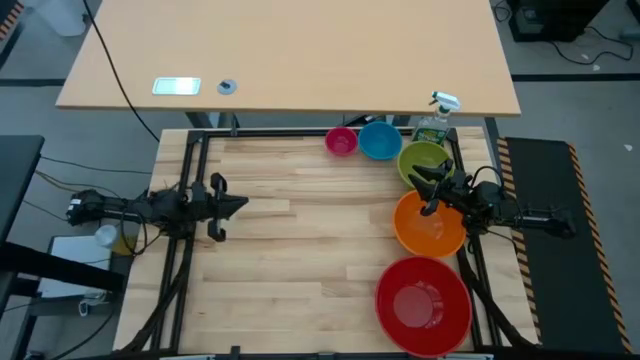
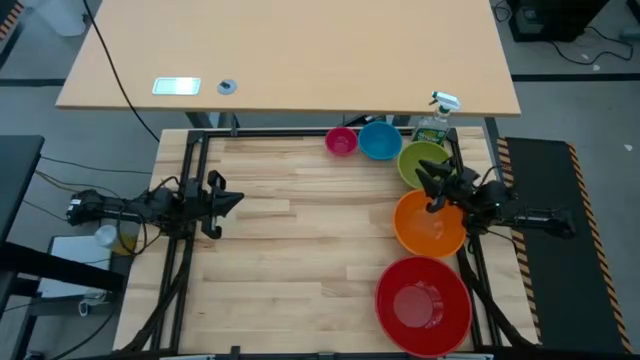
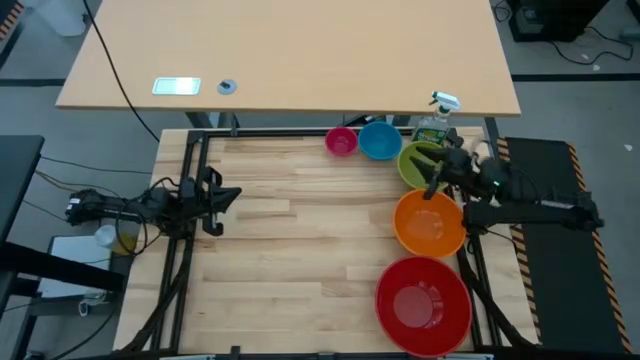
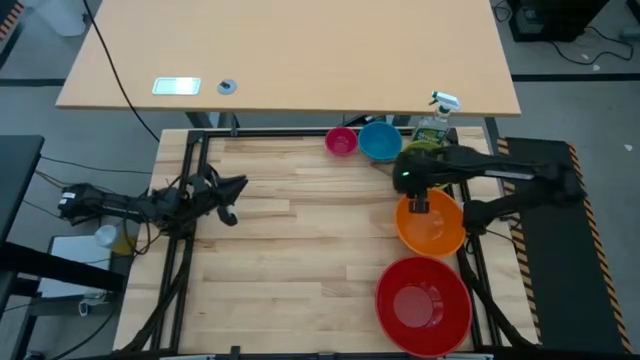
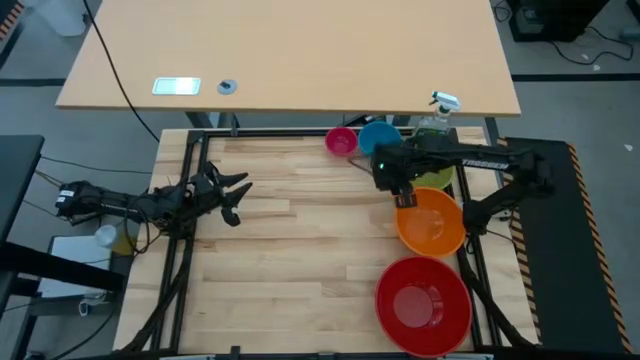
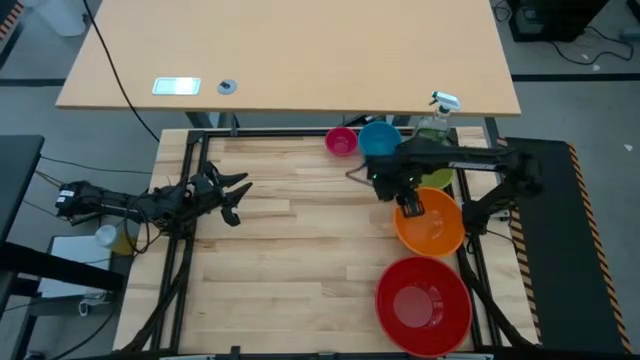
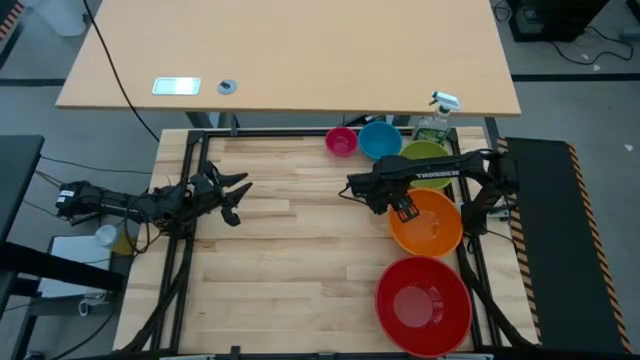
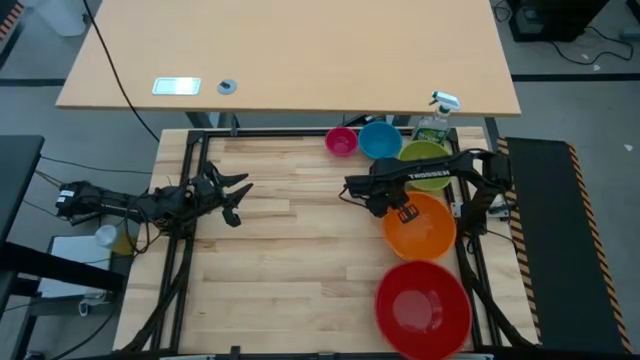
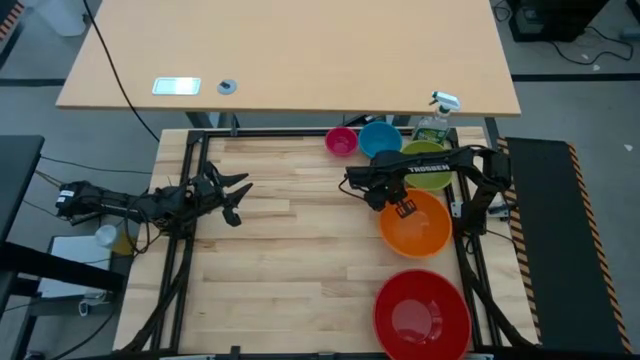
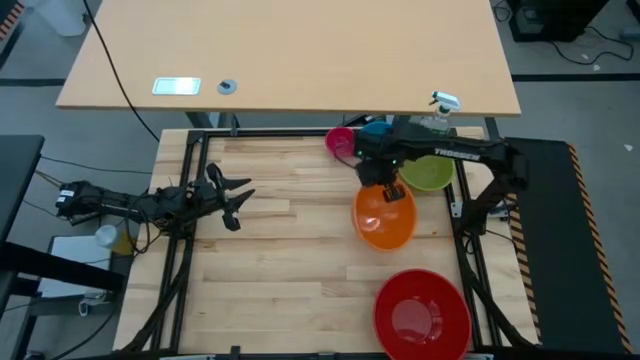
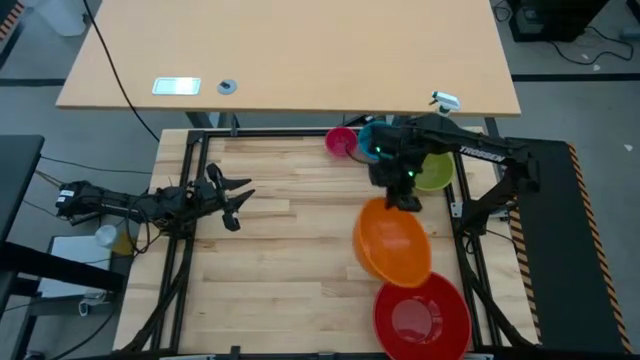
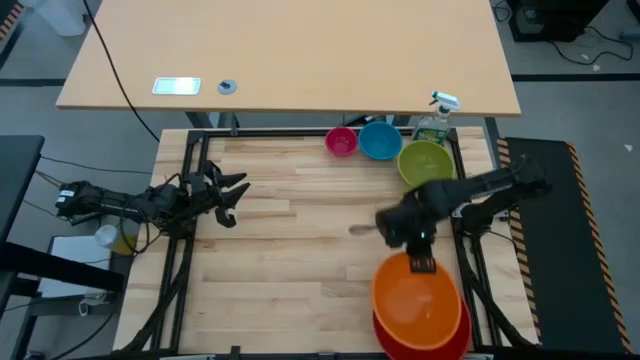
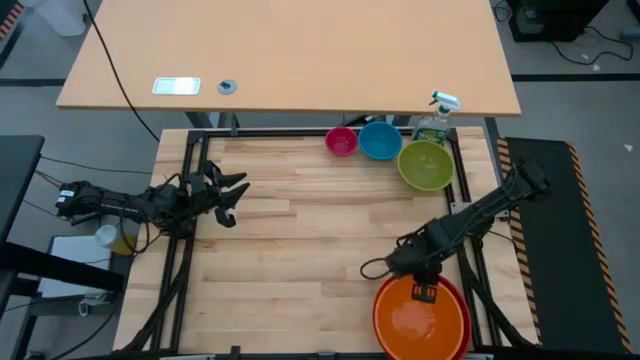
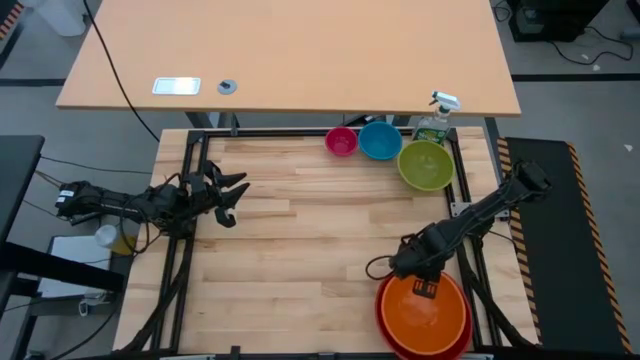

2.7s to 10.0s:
Stack the orange bowl on top of the red bowl

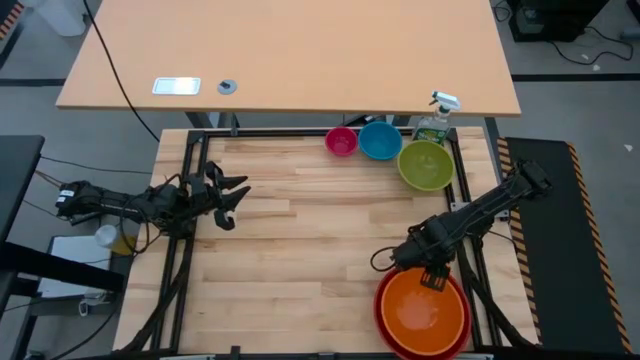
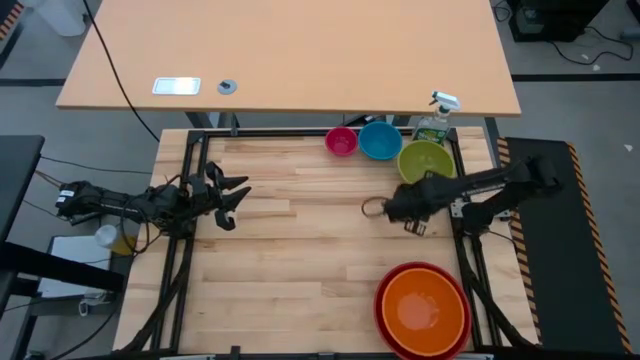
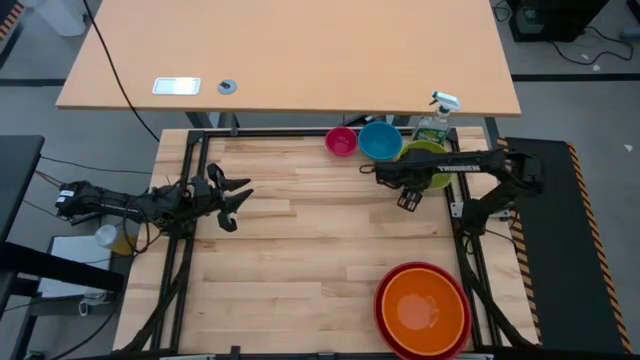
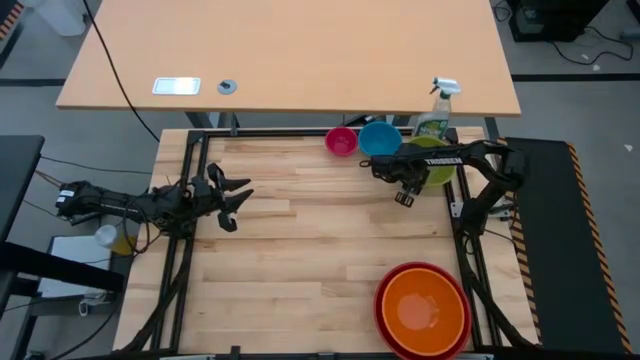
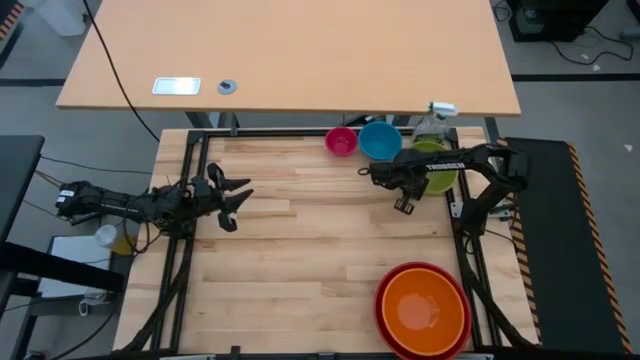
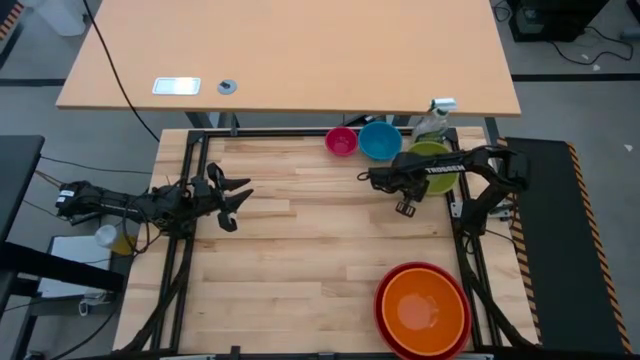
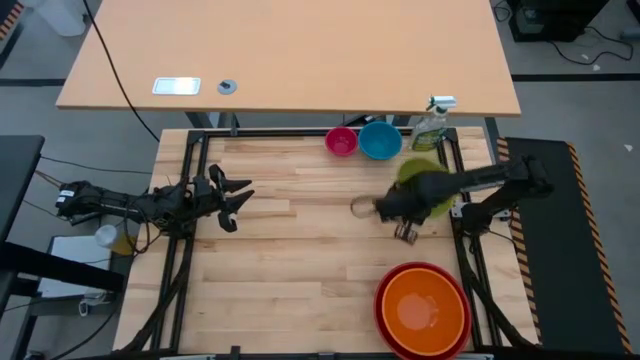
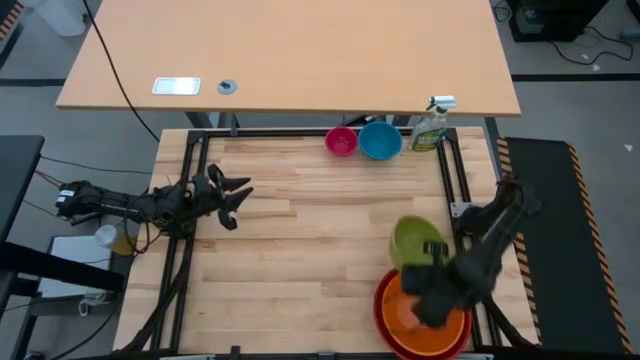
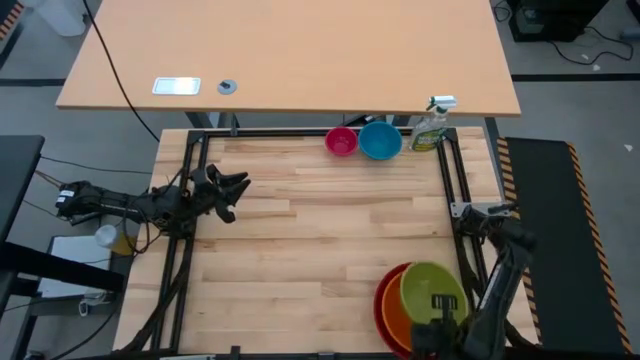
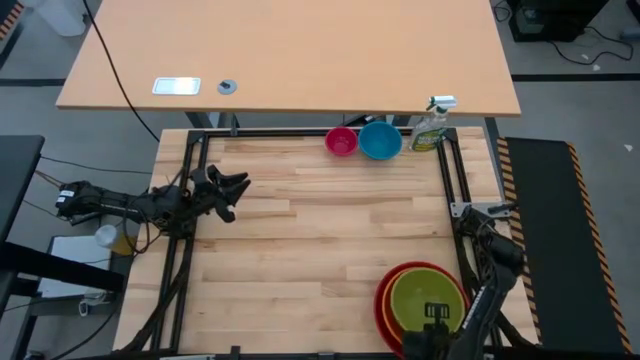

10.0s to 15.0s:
Stack the green bowl on top of the orange bowl

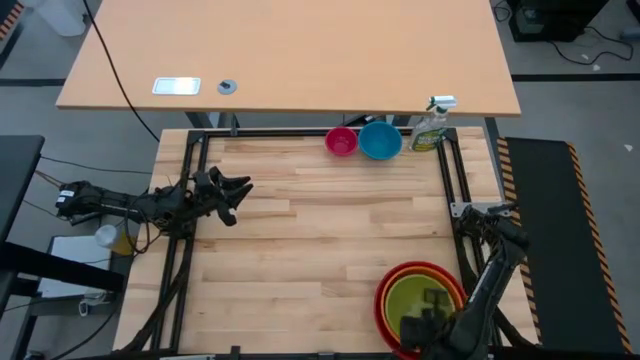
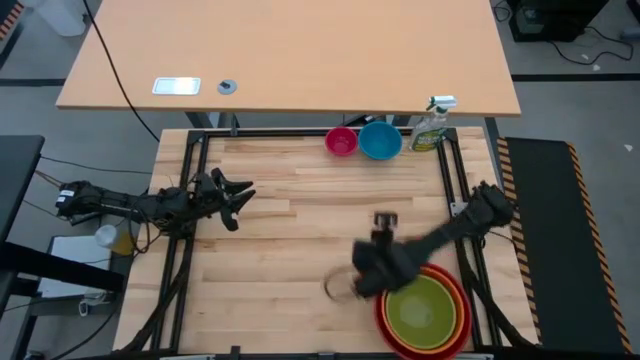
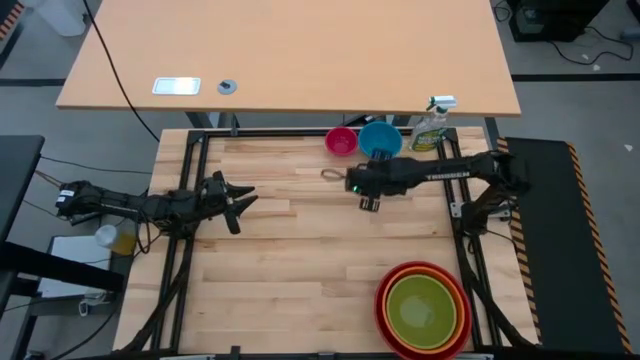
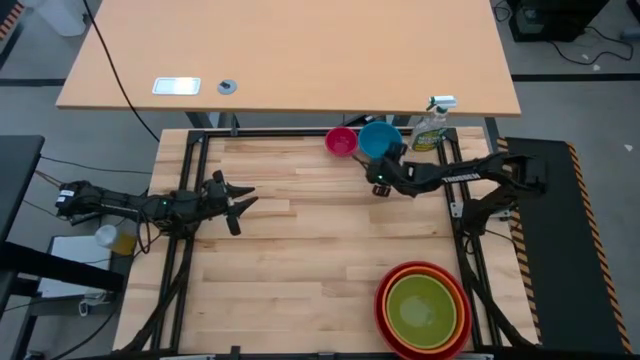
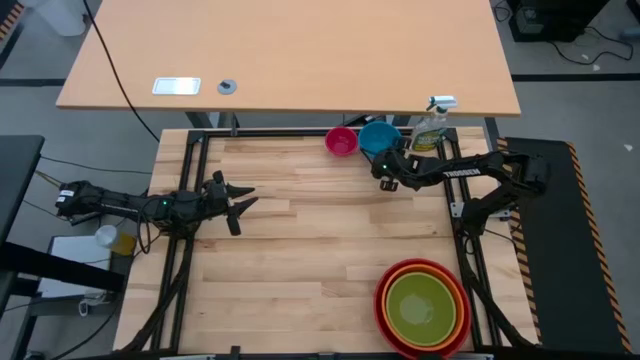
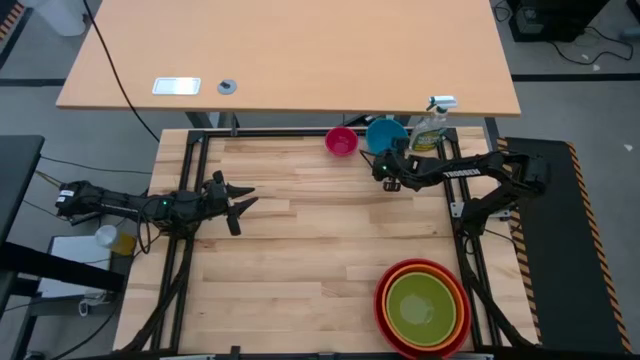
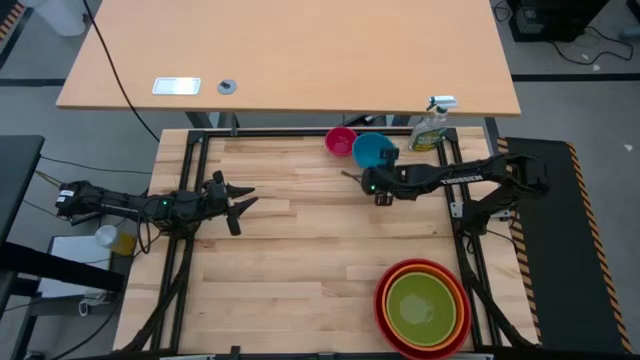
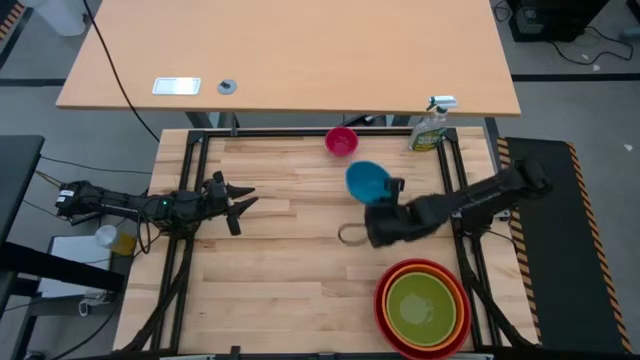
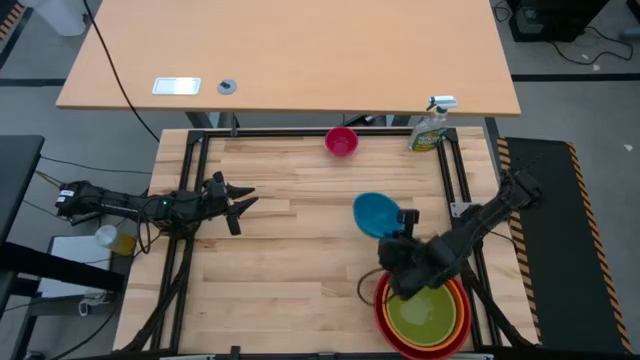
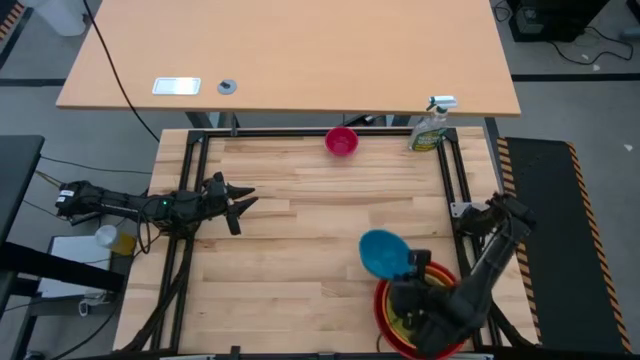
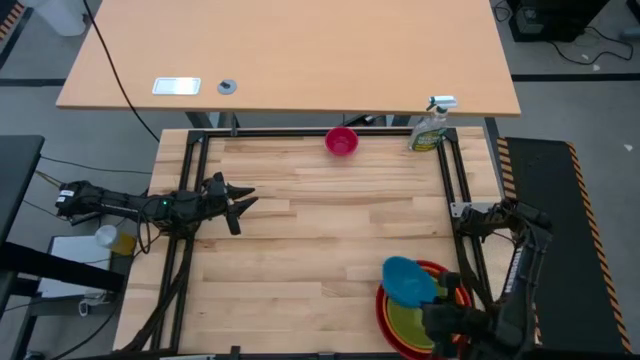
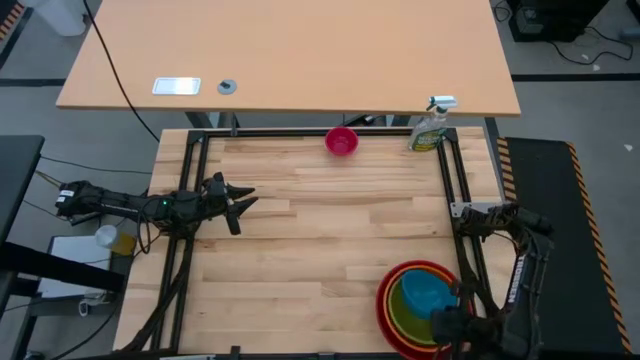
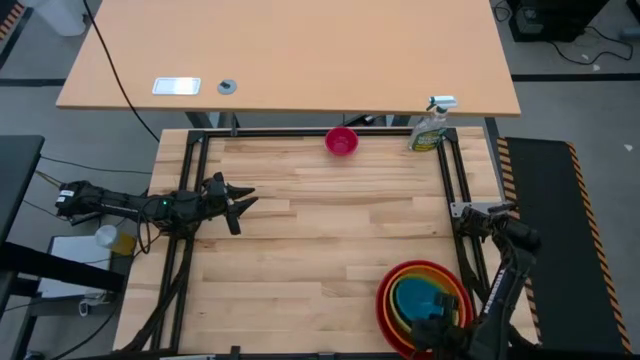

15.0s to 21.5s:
Stack the blue bowl on top of the green bowl
